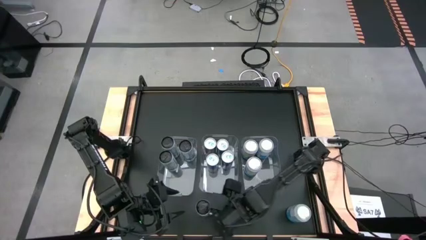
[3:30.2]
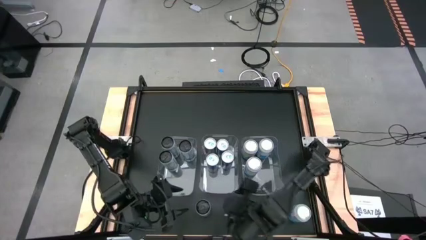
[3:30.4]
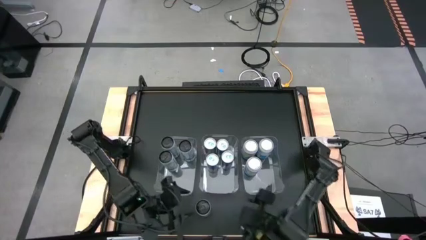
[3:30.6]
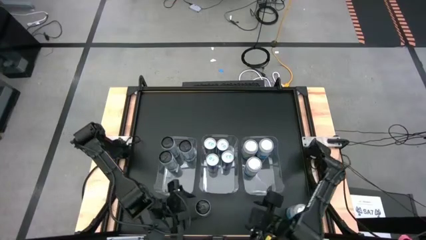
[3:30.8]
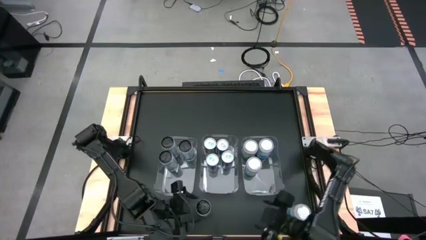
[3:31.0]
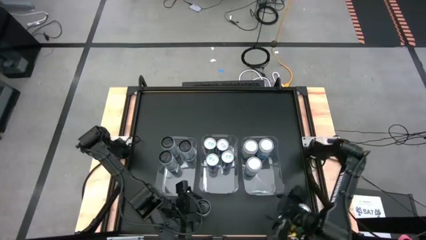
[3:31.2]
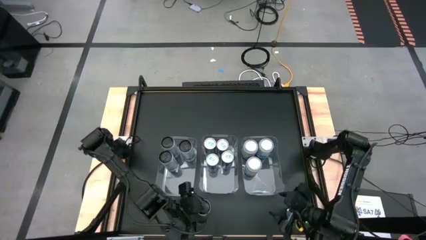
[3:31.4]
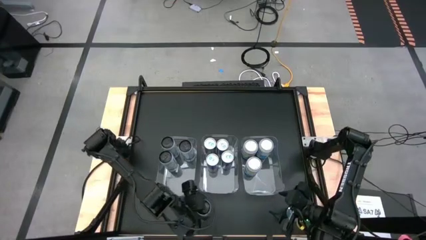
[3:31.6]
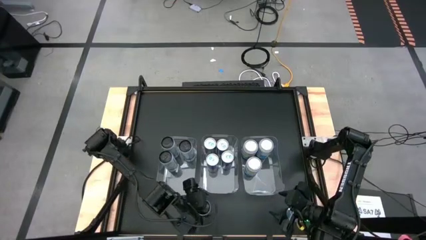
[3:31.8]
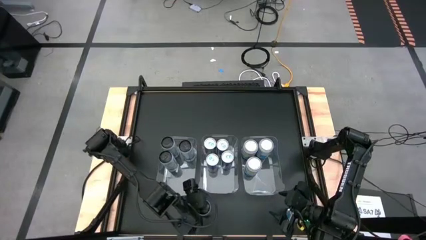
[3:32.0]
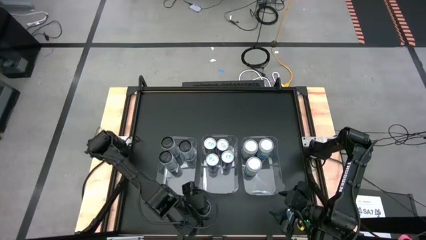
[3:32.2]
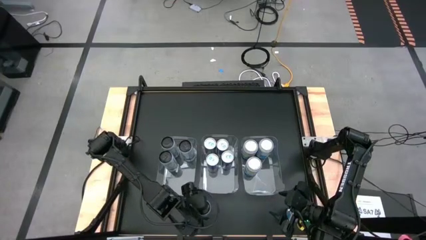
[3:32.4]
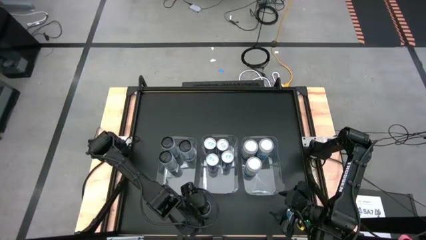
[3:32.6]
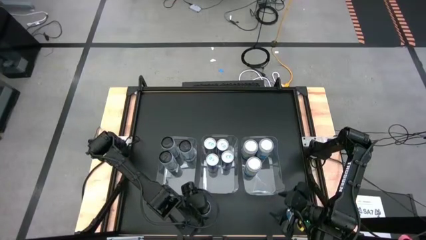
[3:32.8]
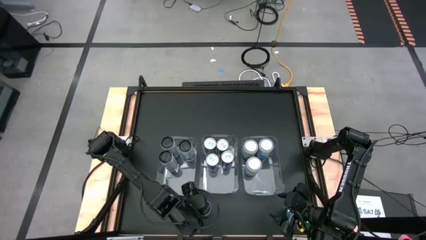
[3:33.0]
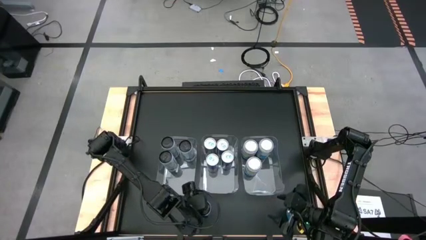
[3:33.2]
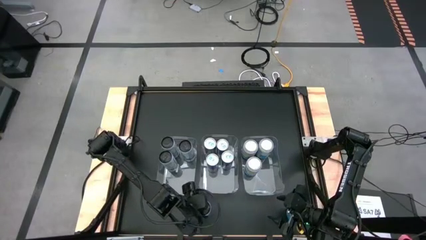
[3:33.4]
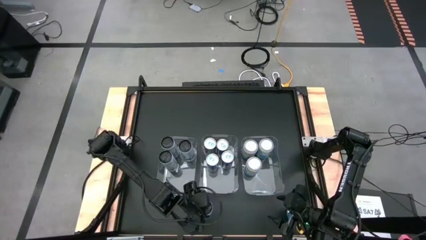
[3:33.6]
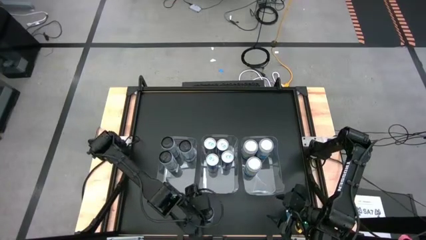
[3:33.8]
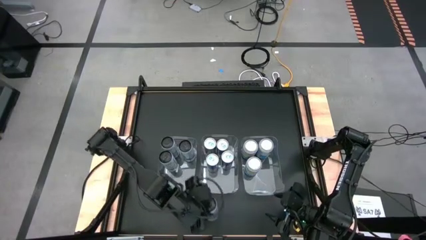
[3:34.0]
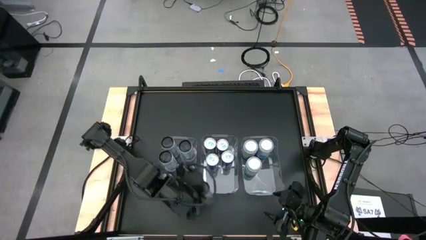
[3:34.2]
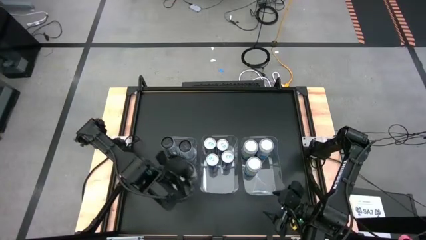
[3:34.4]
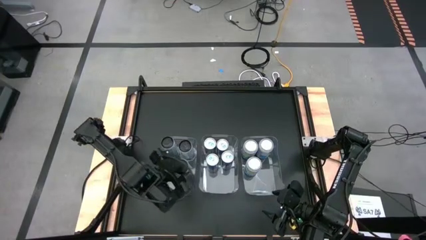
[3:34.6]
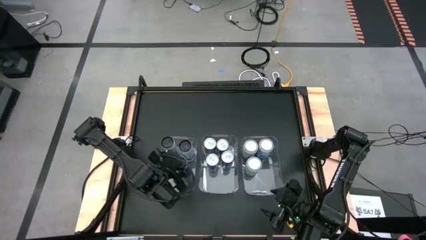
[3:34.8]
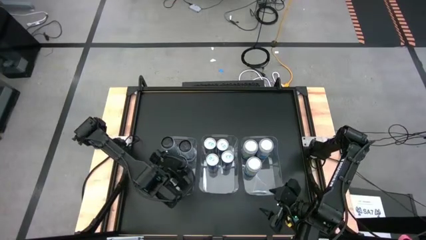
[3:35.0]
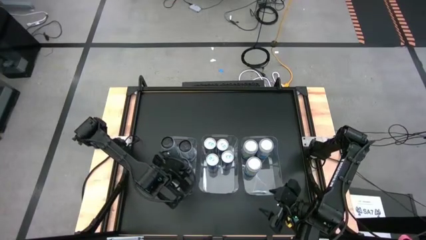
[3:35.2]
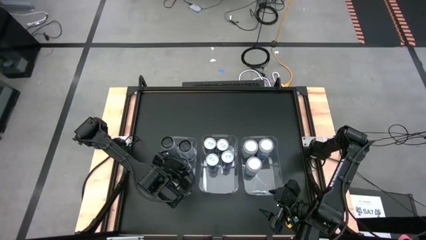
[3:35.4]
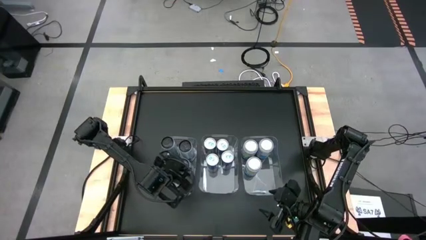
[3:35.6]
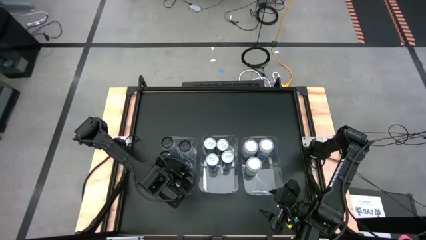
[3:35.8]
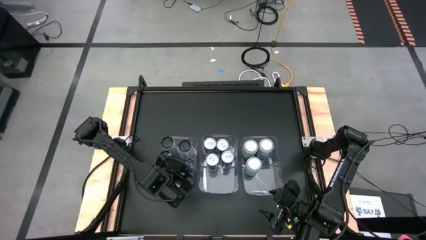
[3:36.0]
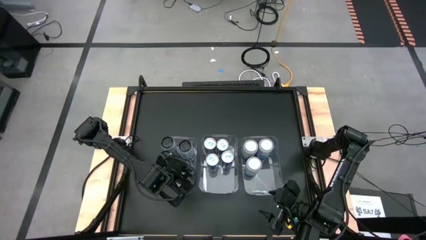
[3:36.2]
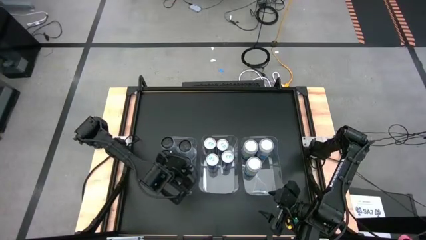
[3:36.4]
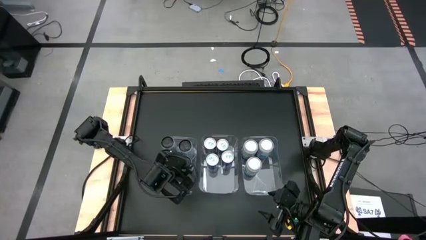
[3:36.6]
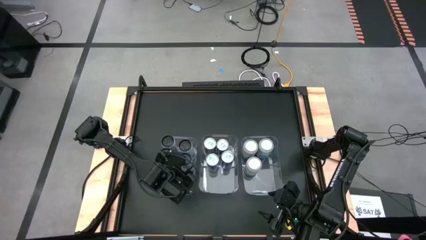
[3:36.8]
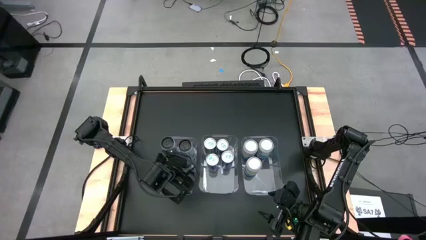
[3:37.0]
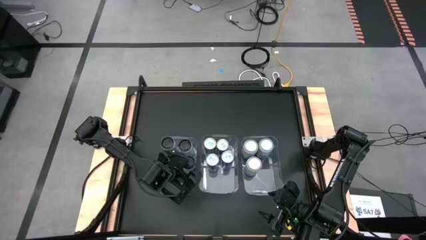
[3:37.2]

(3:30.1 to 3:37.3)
Task: Sort soda cans
Put the white soda can into the left transparent bin

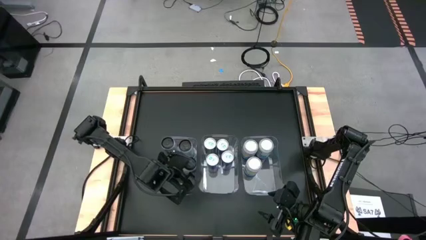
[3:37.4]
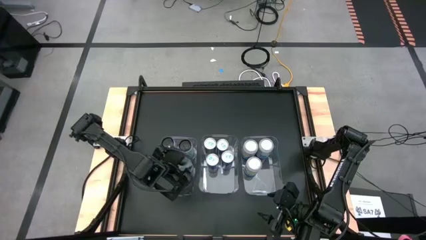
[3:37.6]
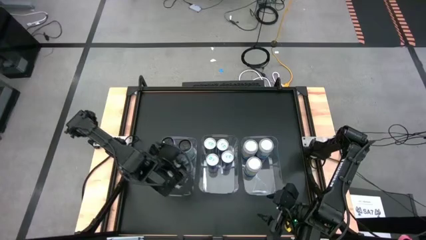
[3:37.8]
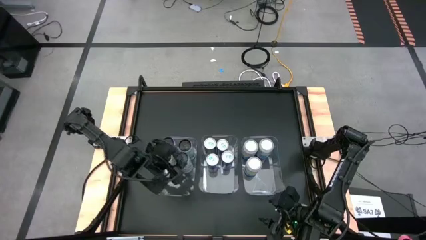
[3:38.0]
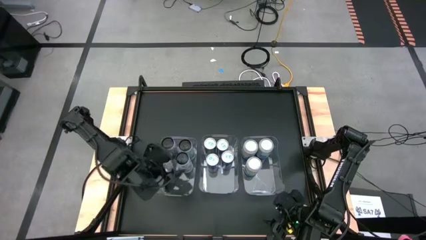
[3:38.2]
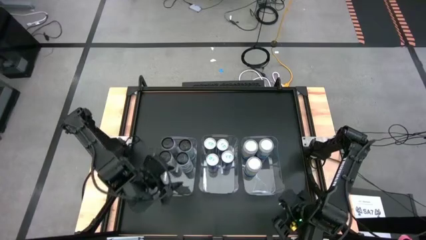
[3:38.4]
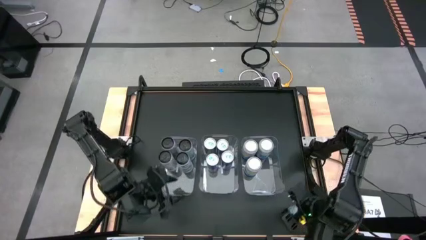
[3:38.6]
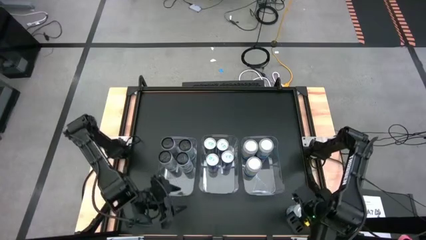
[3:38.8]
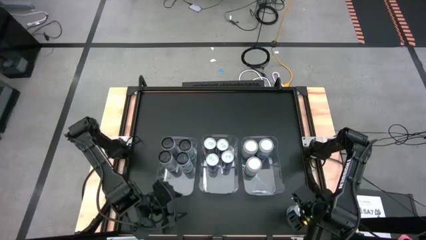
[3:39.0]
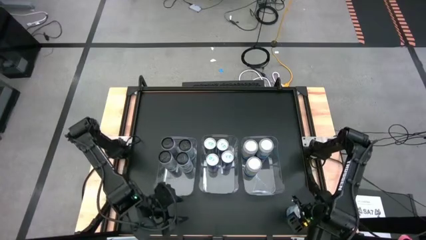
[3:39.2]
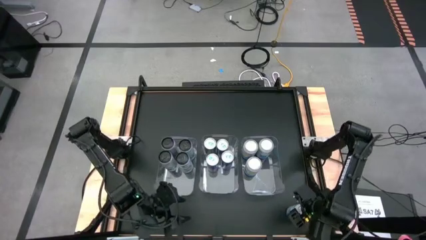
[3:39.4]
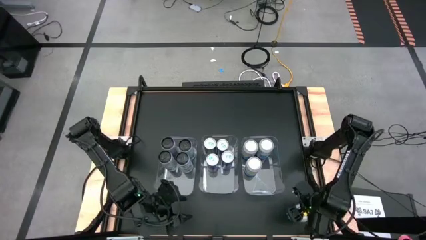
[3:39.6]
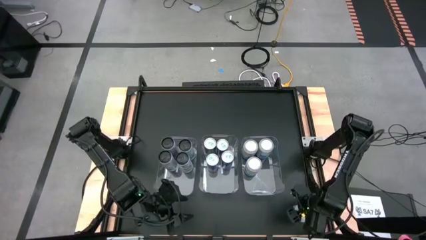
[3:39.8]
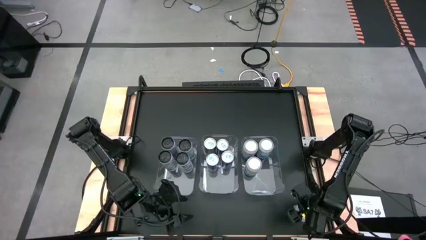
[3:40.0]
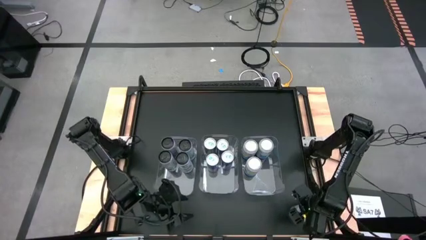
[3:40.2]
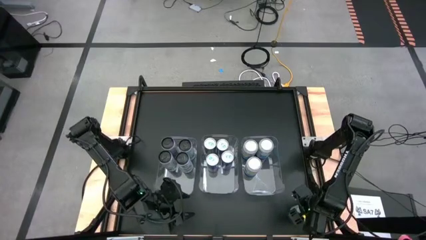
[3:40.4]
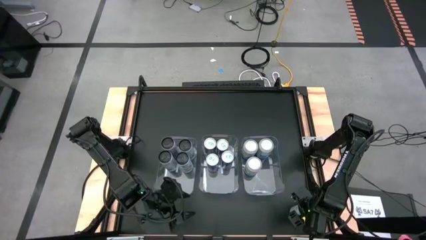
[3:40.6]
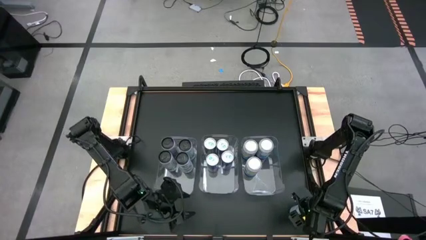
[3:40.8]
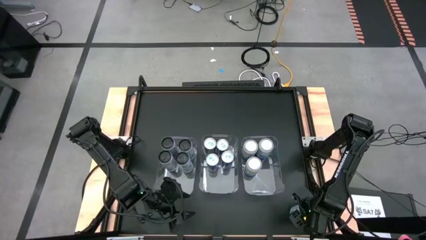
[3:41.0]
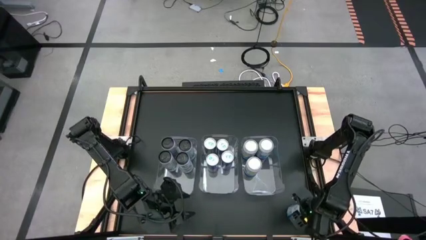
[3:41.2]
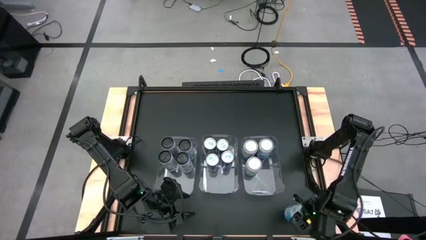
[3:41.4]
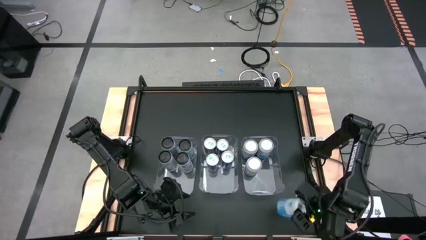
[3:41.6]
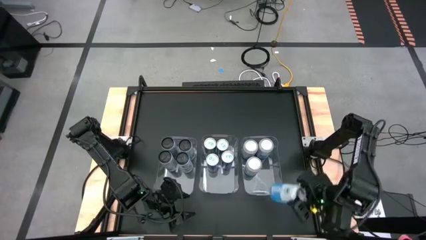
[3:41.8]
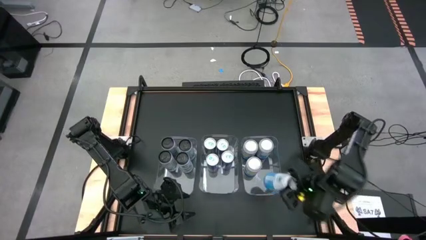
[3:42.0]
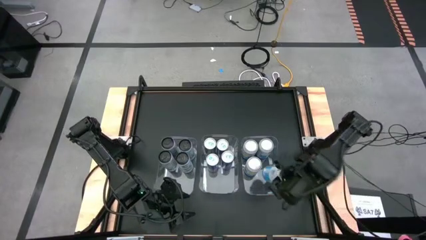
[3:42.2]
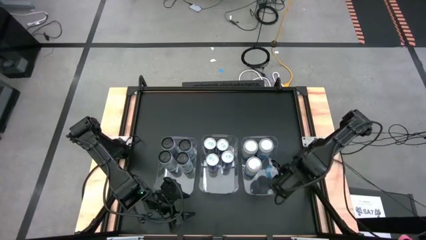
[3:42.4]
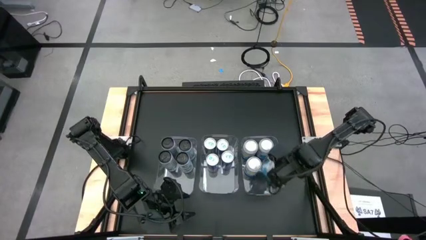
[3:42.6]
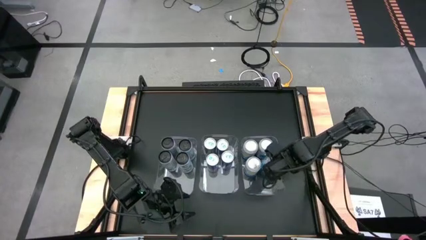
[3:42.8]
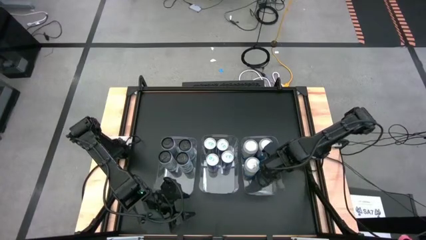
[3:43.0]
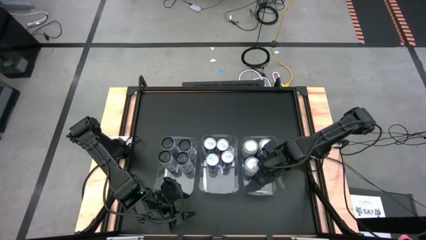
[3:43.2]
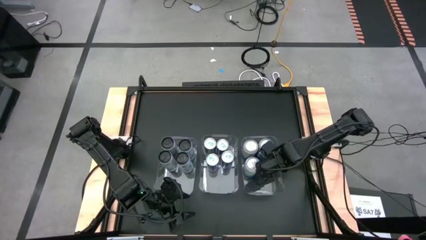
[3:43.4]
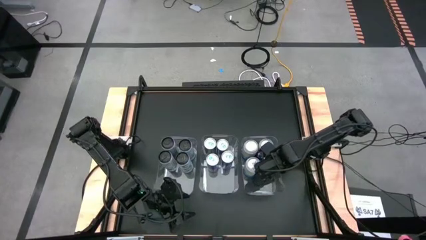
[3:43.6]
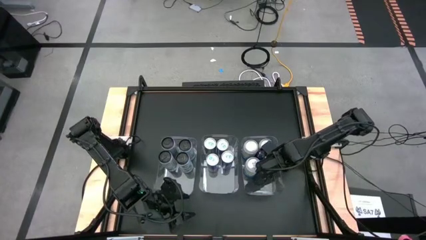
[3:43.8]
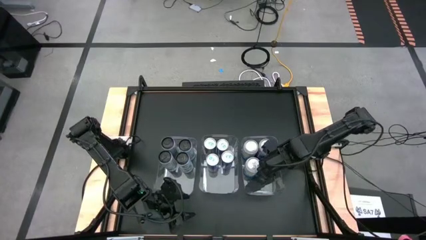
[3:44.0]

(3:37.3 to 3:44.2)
Put the white and blue soda can into the right transparent bin

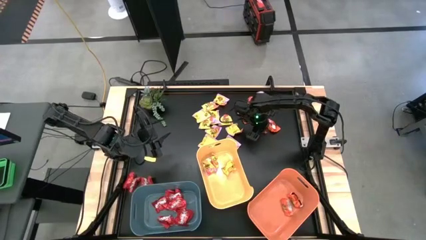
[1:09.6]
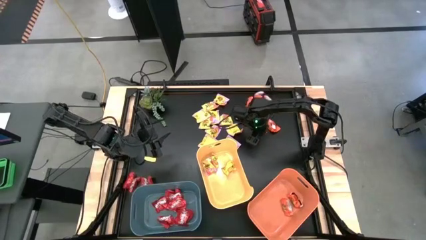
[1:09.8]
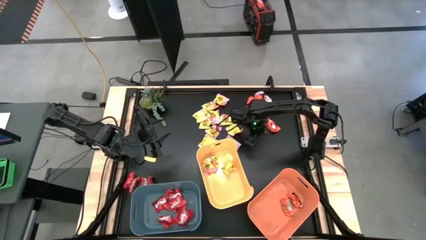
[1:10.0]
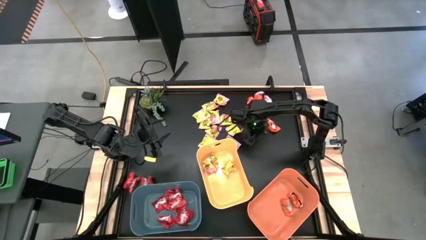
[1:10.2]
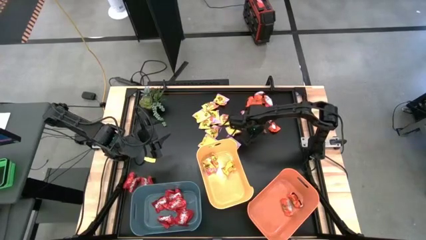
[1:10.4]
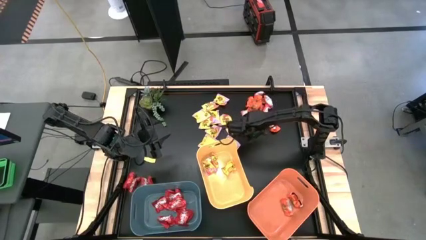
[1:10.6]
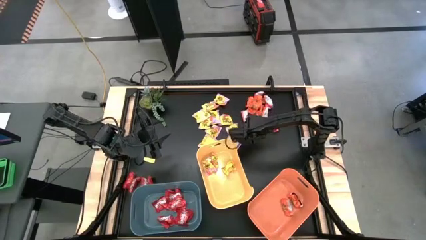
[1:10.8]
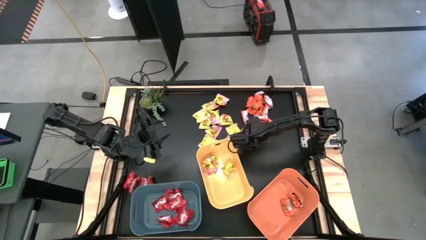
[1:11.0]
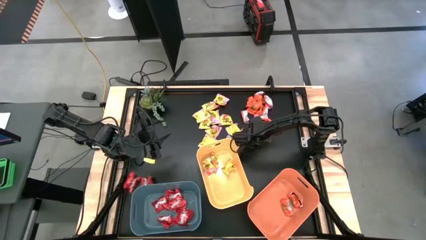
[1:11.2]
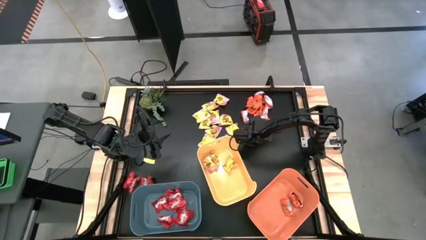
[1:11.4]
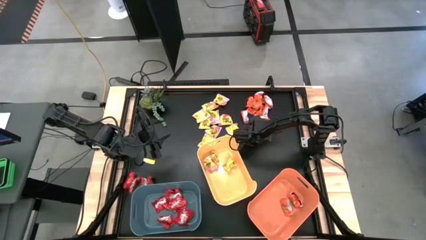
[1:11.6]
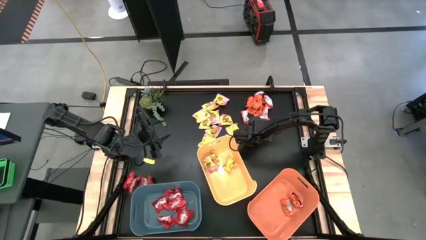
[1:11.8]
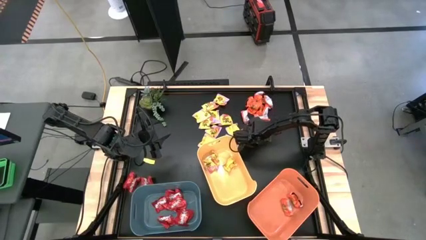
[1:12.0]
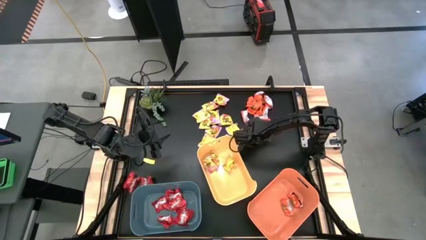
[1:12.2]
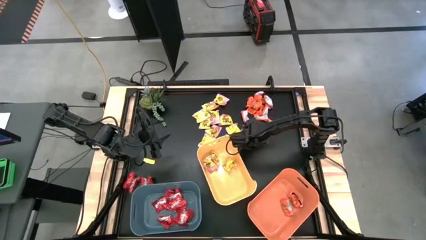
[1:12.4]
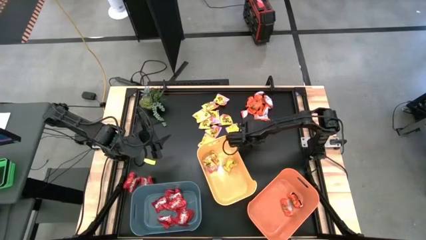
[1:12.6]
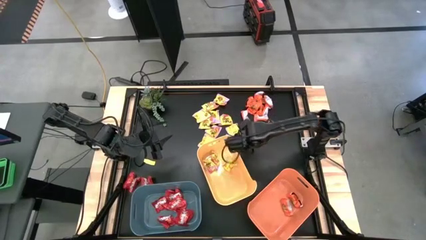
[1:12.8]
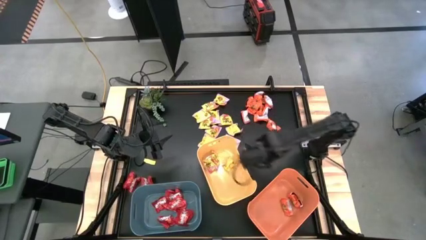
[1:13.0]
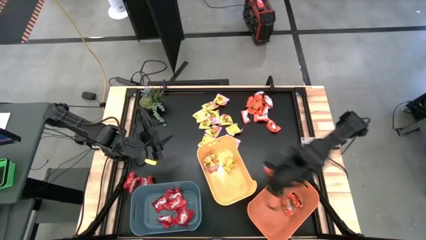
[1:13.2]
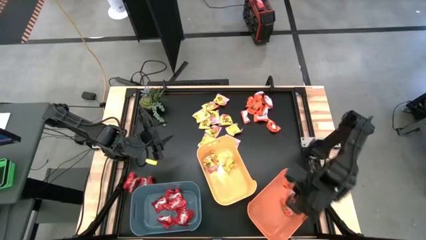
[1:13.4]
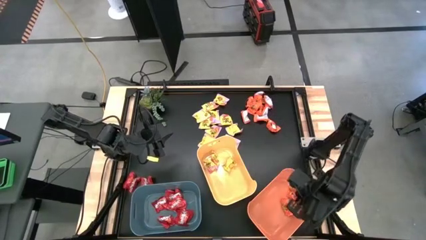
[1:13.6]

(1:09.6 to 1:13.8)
Task: Sort candy
Put the orange chocolate into the orange bin
